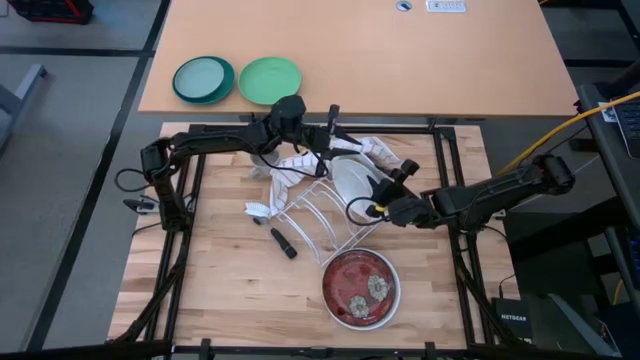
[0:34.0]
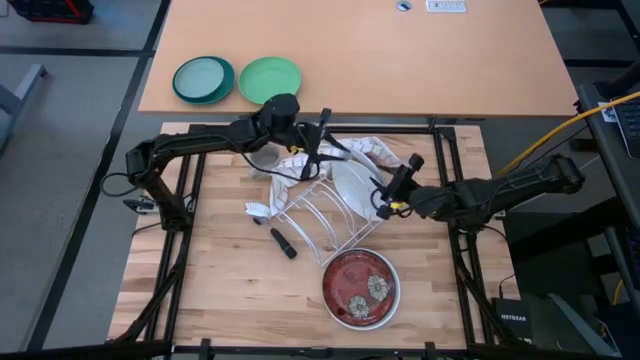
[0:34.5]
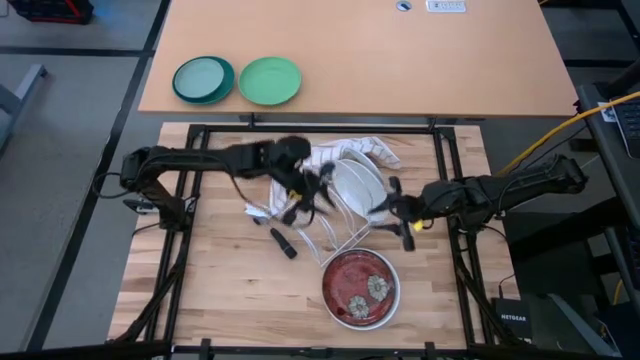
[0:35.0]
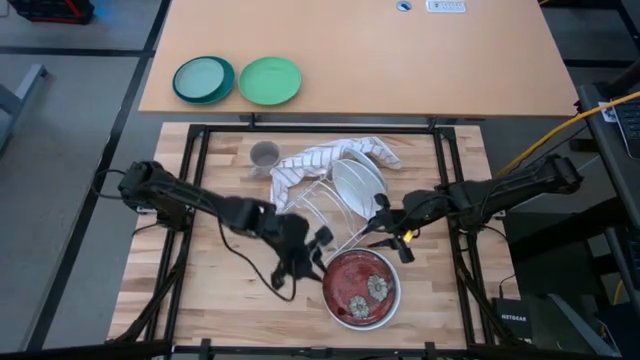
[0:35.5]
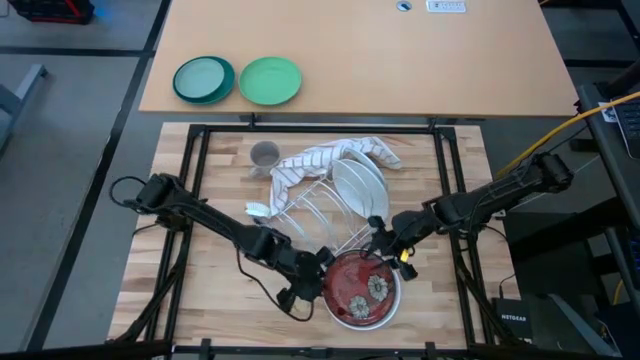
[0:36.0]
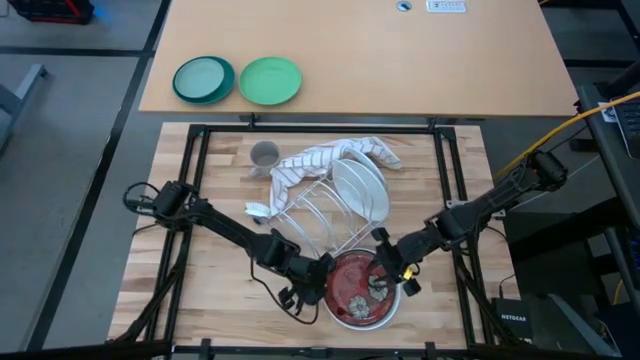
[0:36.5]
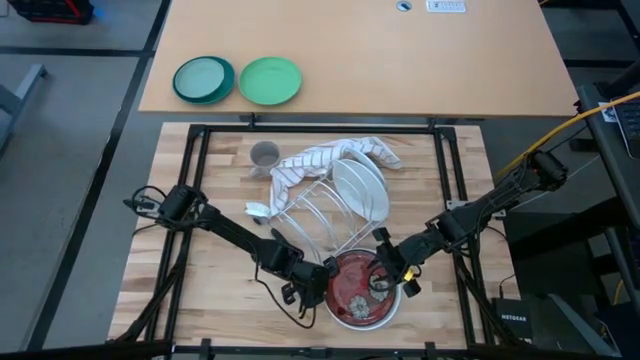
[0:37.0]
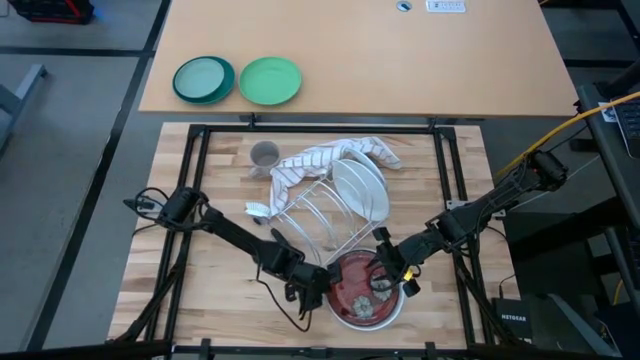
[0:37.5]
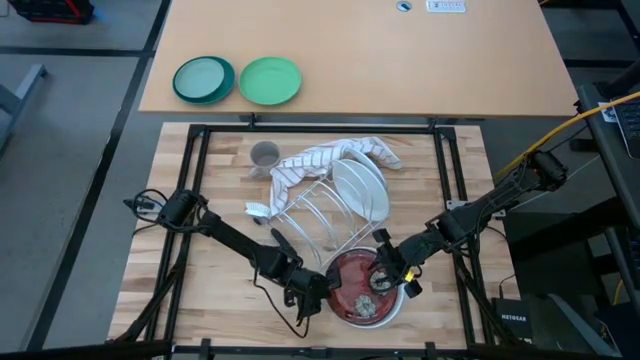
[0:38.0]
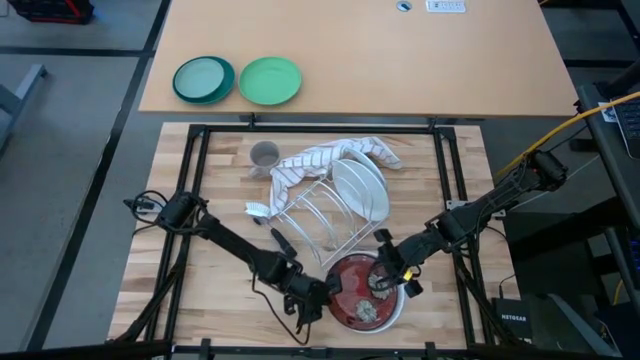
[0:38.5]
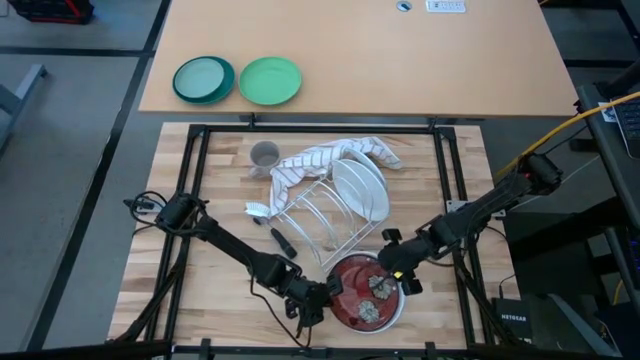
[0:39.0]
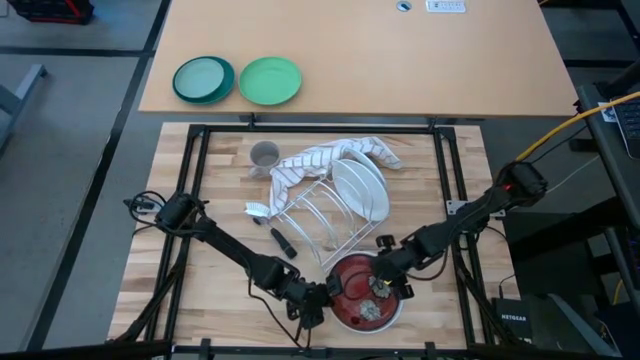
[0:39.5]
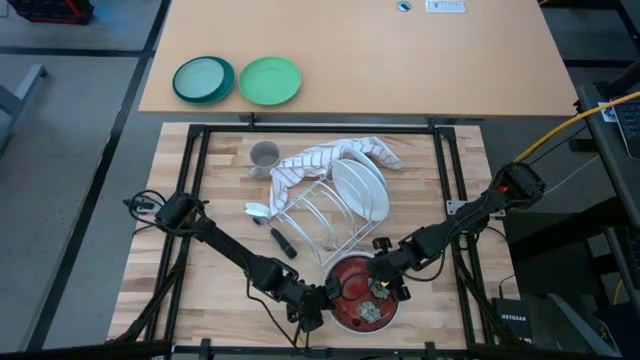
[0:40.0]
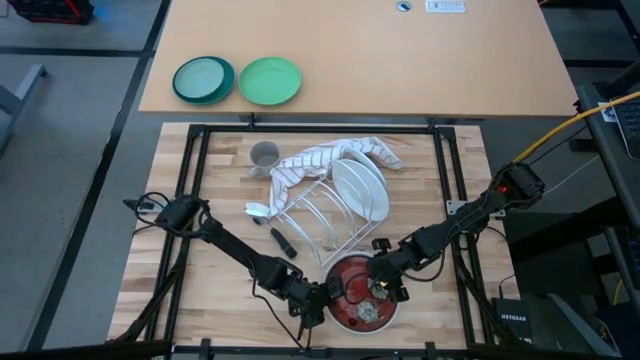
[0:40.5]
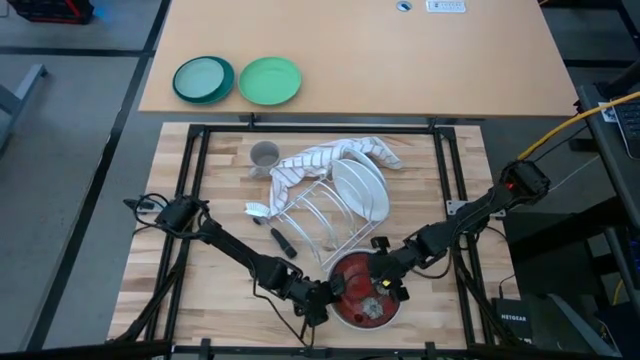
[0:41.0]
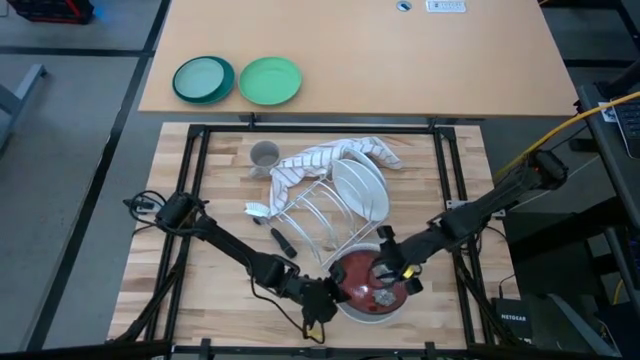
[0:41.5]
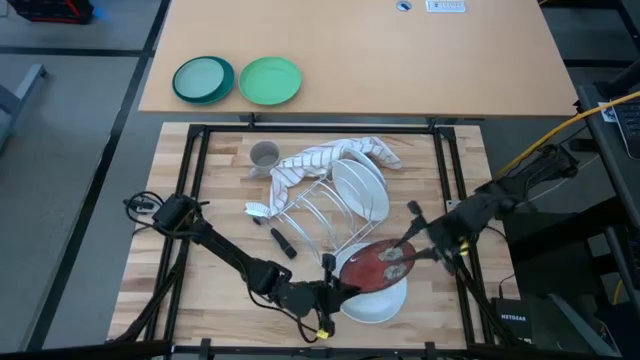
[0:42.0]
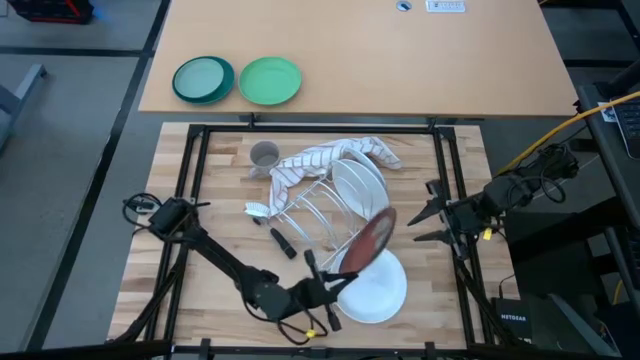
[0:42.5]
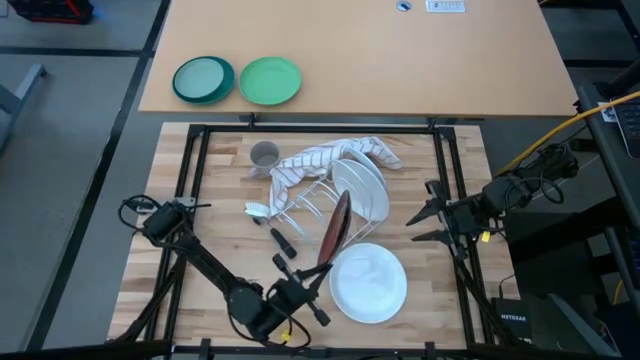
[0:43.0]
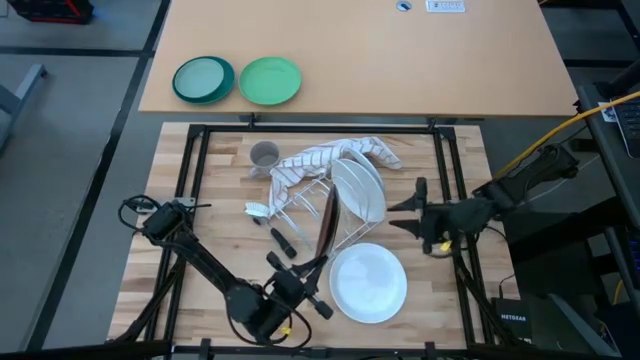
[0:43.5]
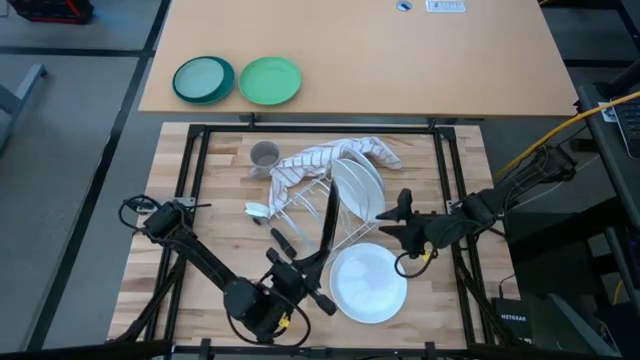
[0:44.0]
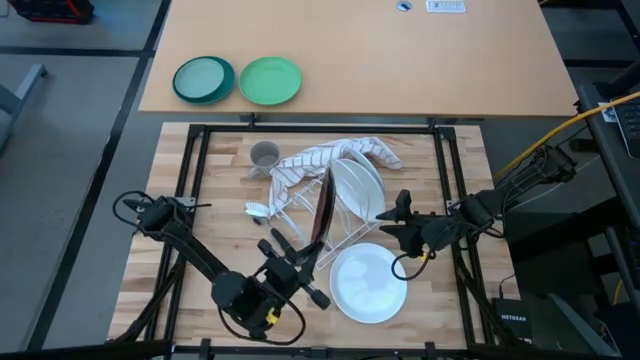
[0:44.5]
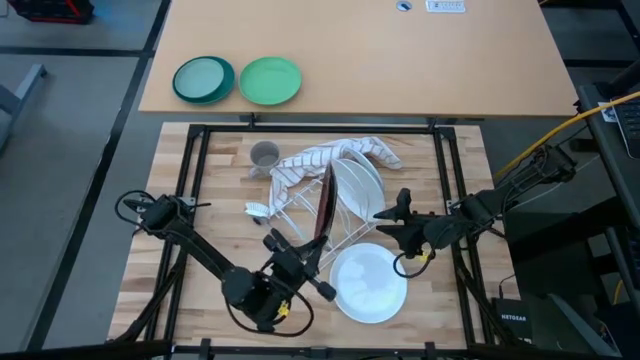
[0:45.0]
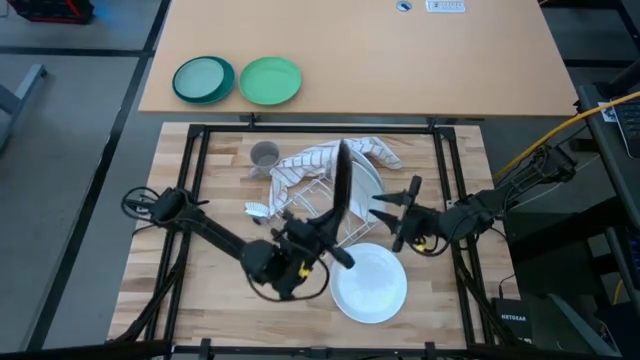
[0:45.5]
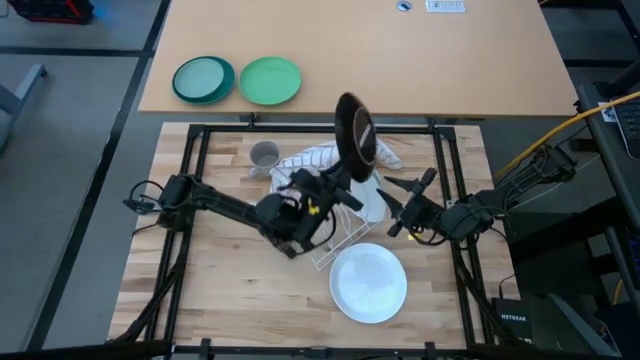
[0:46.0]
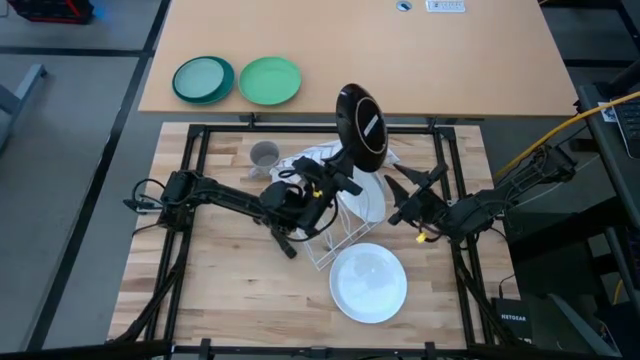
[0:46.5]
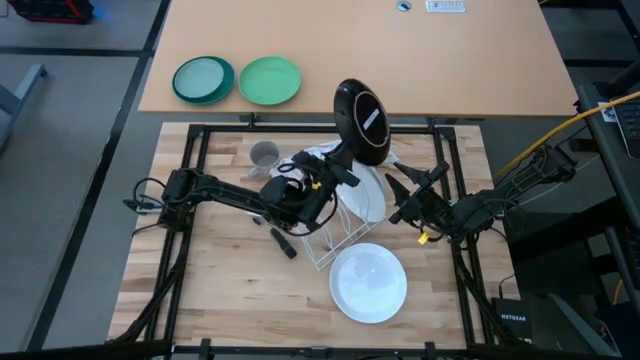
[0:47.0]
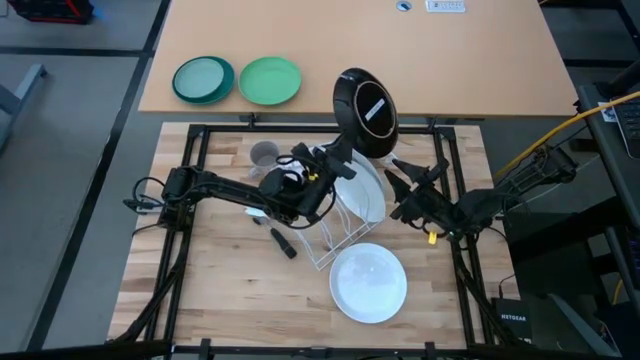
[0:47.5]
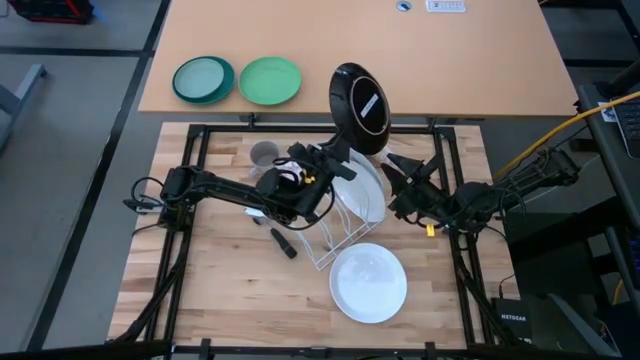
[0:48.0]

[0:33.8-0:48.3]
Task: Sort dishes
Put the red patterned plate in the dish rack

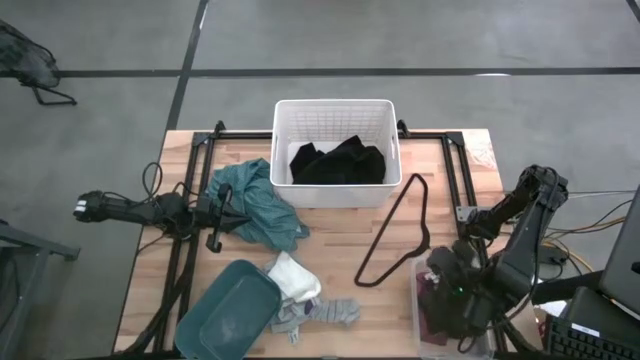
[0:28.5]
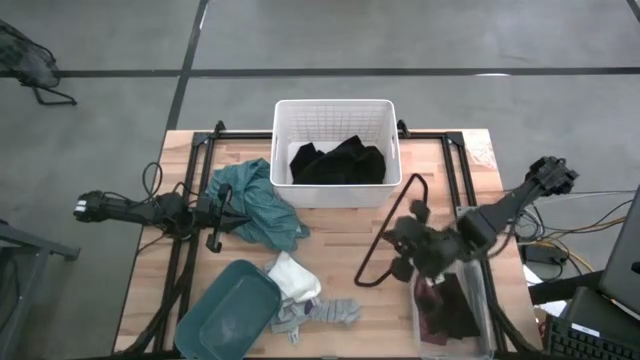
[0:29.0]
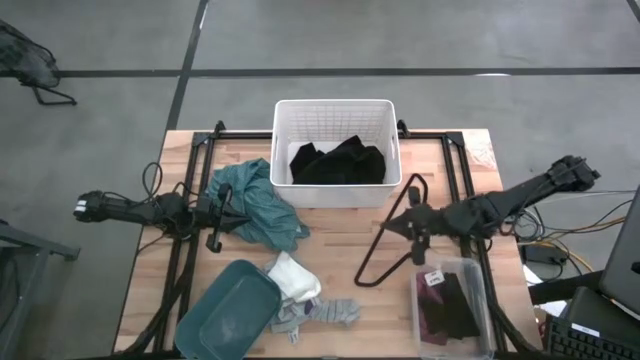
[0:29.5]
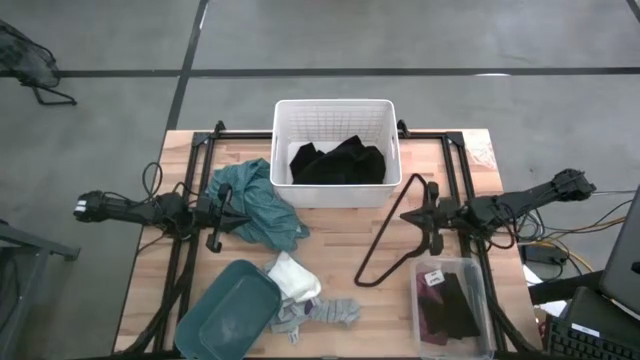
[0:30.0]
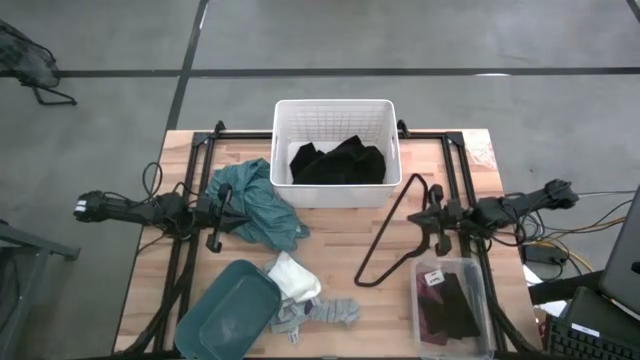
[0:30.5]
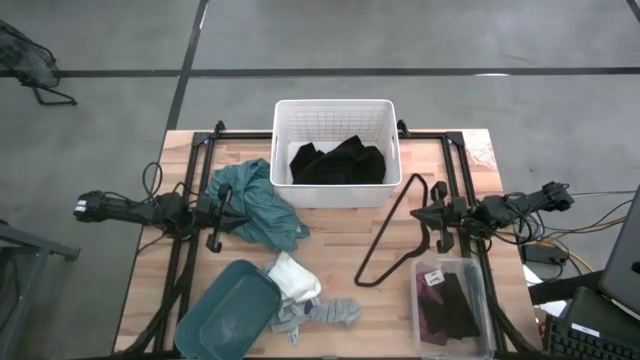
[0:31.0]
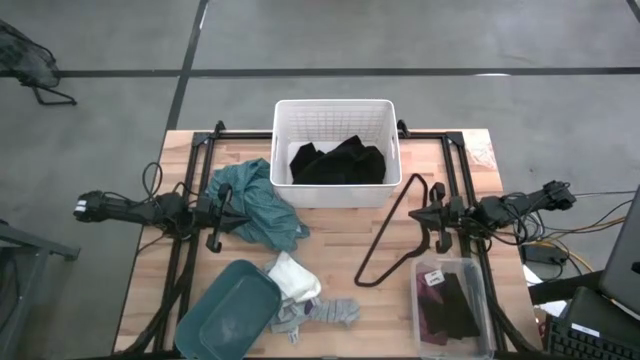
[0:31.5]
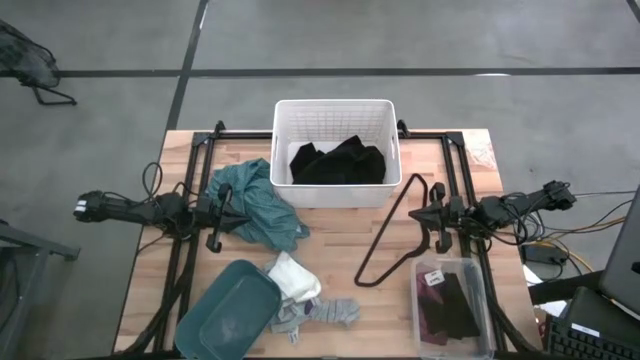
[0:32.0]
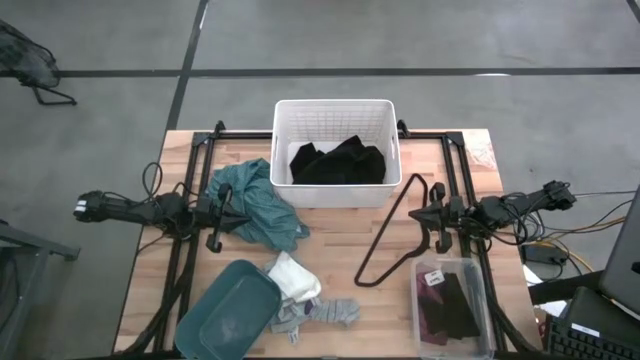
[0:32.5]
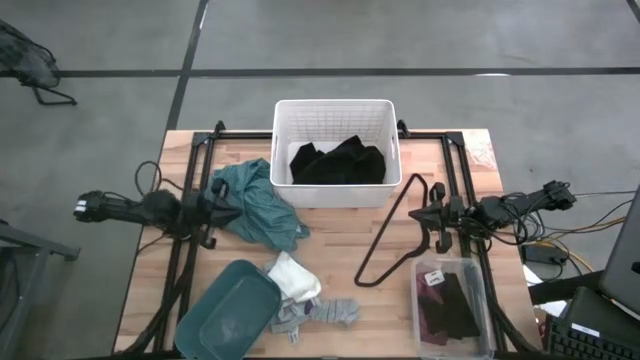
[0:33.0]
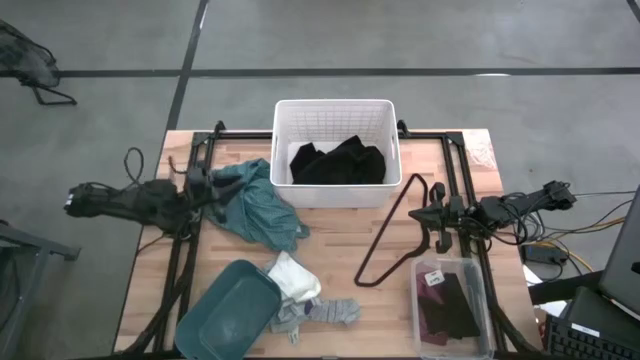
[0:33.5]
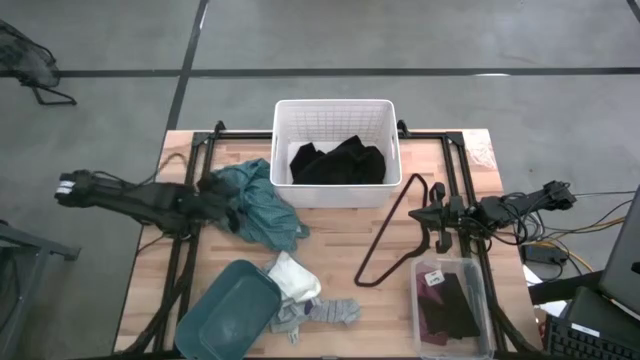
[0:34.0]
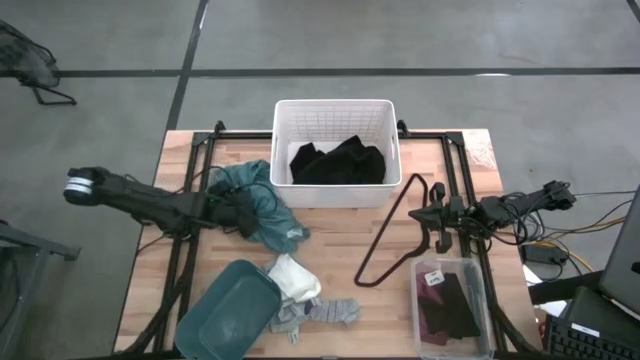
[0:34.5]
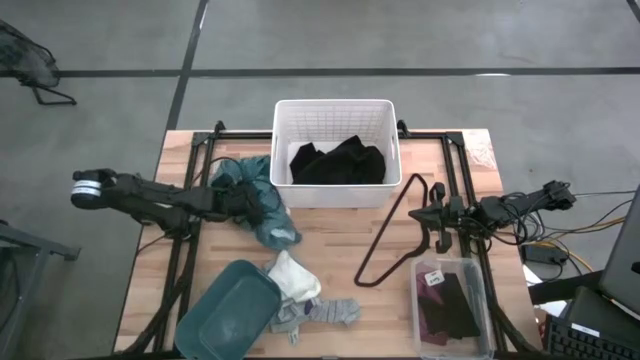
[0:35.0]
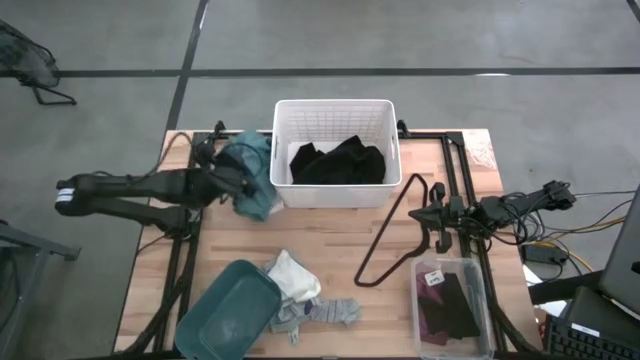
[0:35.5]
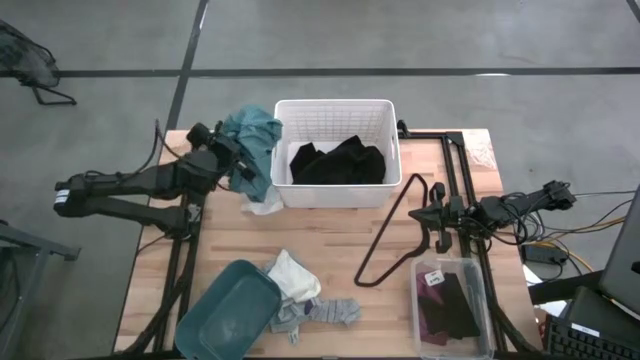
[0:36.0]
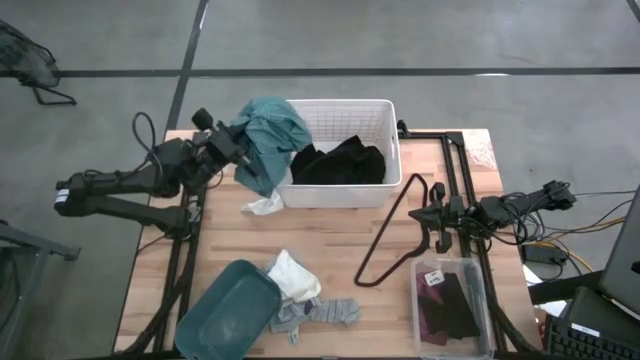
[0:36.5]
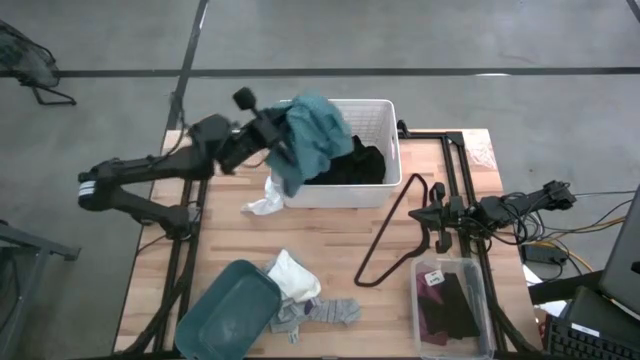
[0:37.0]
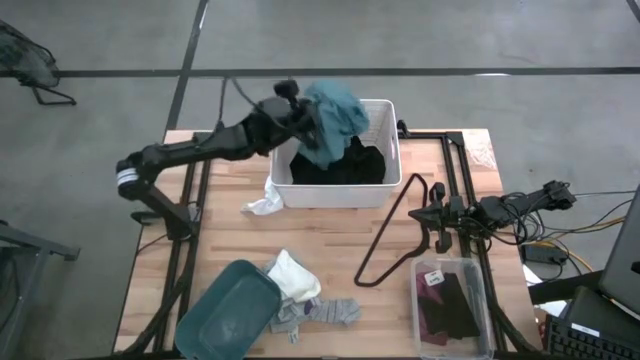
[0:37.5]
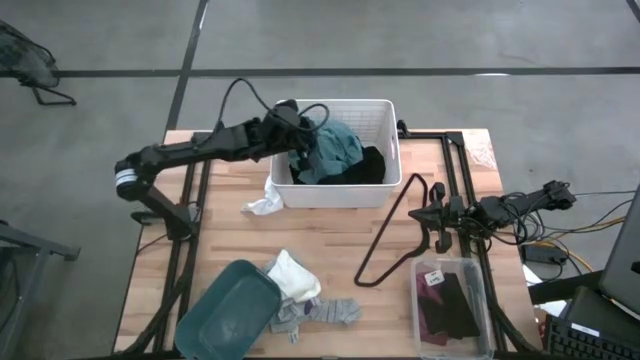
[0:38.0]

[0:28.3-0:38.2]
Task: Pick & Place Cloths
Put the green shirt into the white bin
